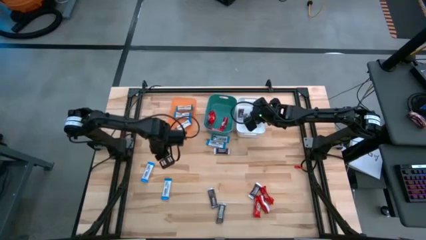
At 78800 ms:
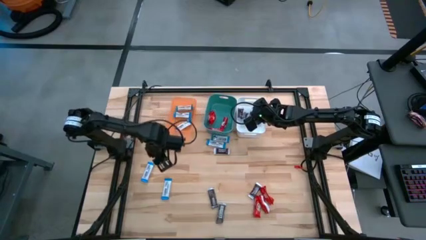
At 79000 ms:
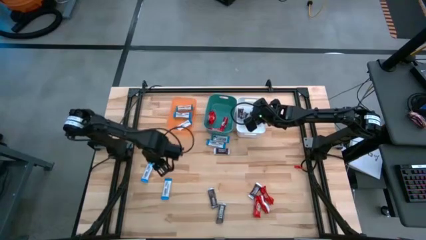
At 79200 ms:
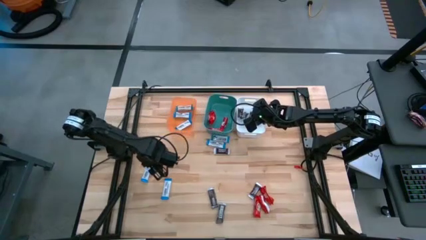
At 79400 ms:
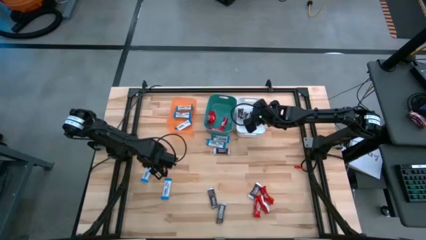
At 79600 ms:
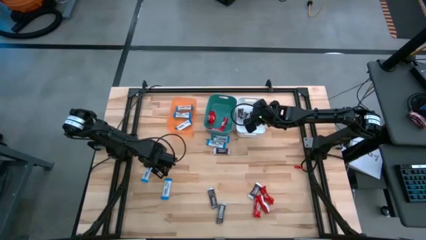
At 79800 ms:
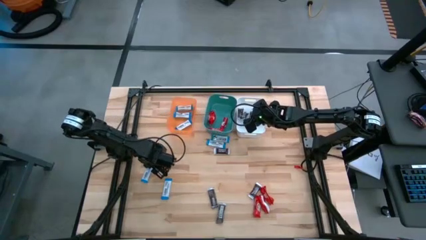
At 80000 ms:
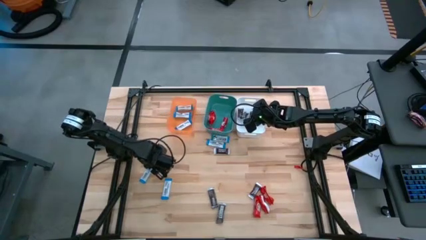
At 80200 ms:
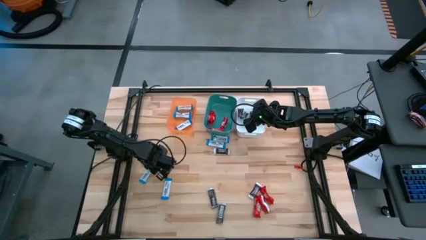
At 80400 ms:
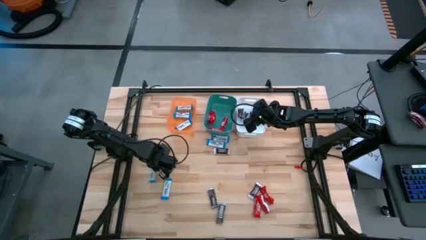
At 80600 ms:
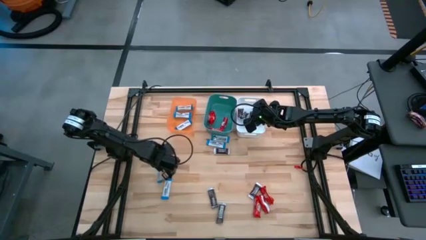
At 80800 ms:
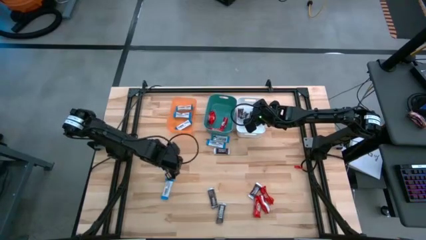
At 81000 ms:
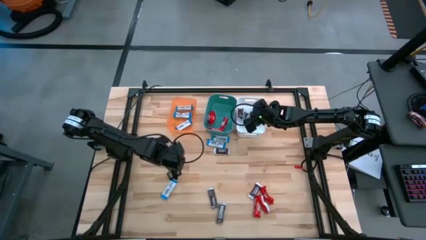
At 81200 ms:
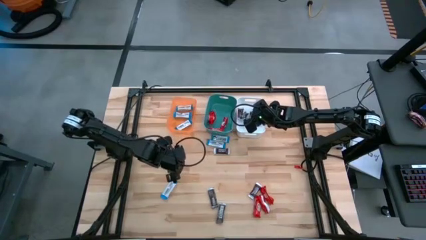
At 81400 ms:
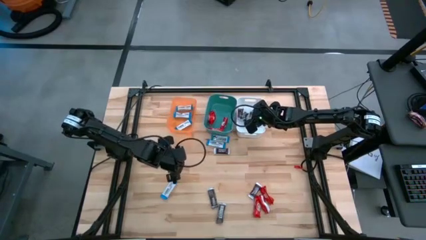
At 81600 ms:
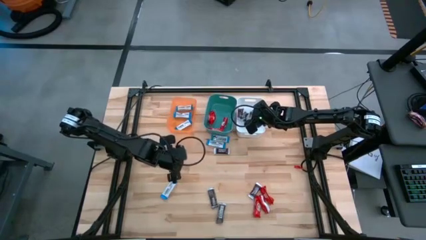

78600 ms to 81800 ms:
Task: Organize candy in baskets
Put the white chocolate into the orange bin

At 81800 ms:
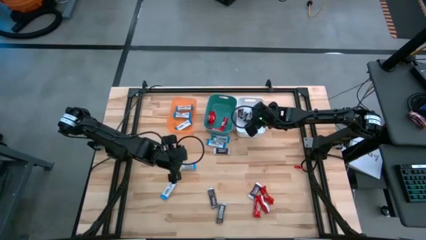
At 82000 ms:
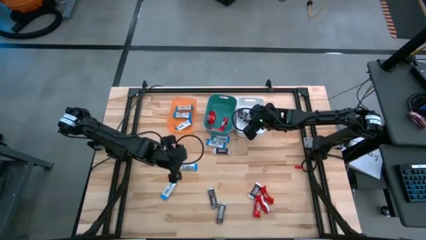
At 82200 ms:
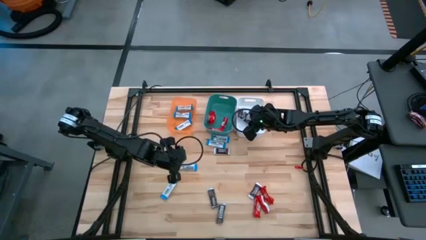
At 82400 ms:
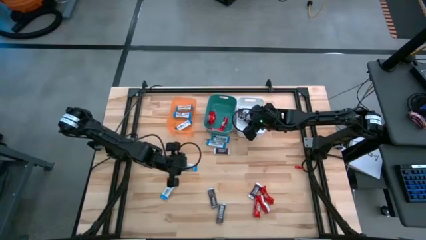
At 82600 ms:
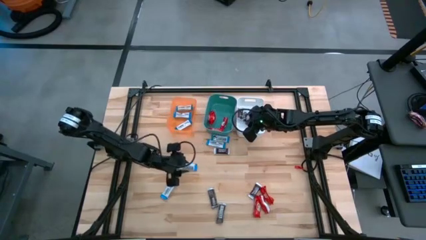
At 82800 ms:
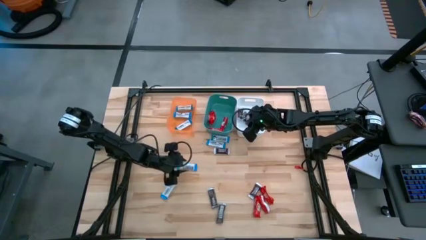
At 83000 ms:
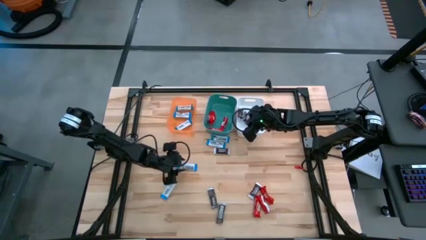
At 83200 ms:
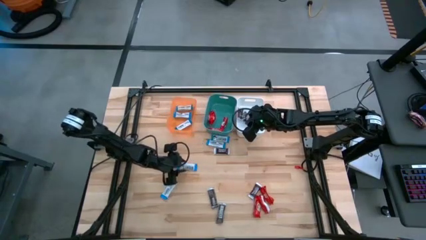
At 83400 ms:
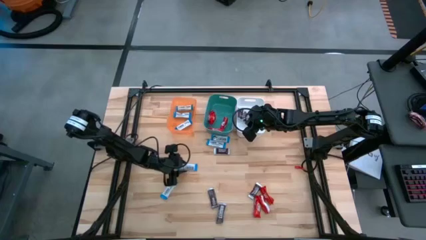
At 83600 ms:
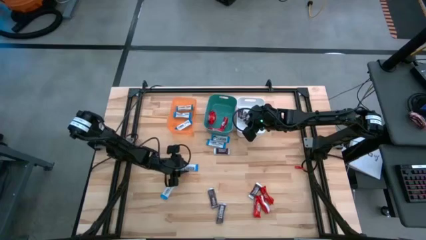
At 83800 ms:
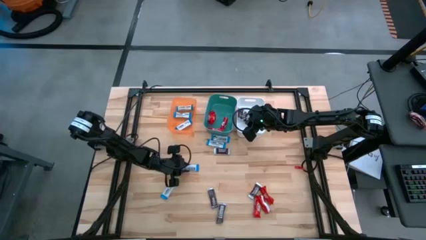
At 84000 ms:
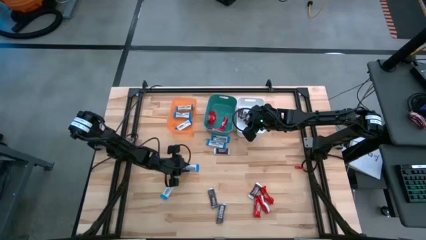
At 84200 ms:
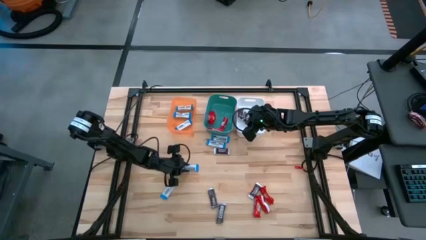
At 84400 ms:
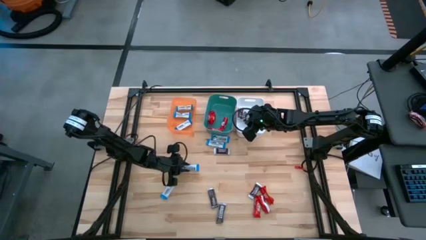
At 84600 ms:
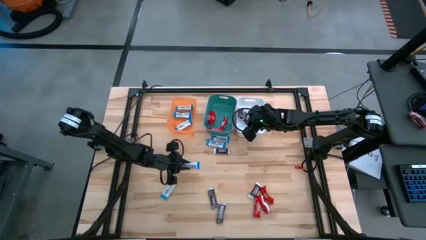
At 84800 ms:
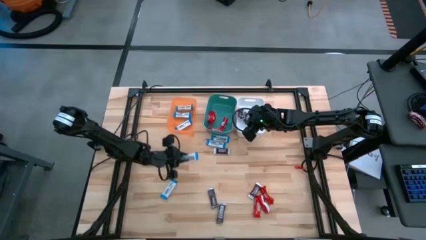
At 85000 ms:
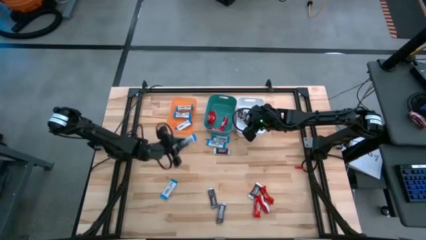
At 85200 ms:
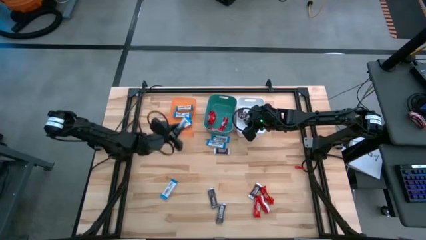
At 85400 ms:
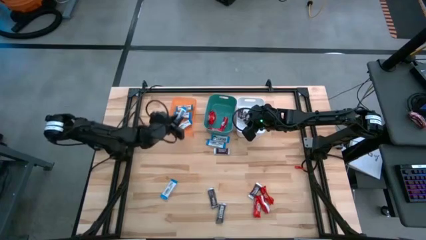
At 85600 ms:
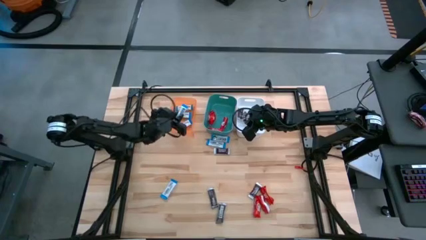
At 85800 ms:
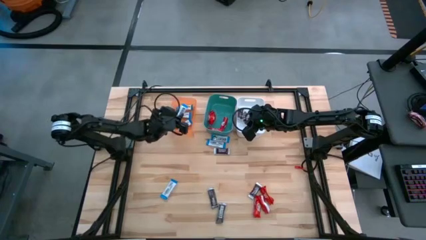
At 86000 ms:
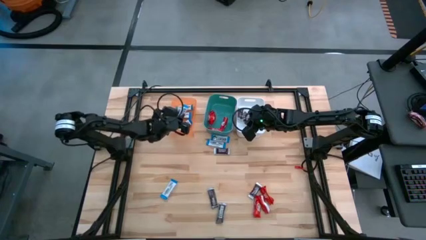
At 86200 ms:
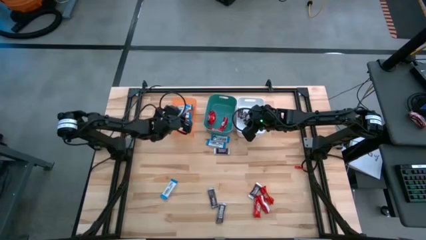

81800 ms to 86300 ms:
Put the white chocolate into the orange bin

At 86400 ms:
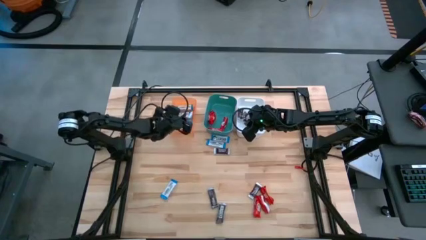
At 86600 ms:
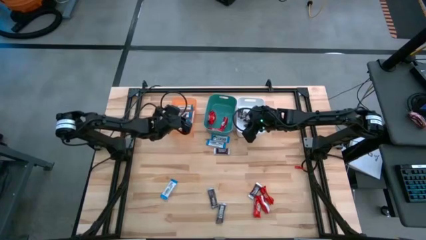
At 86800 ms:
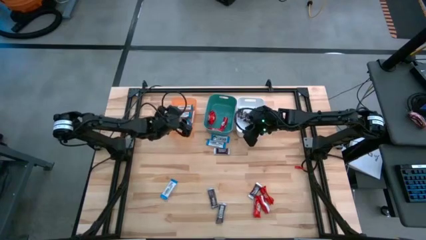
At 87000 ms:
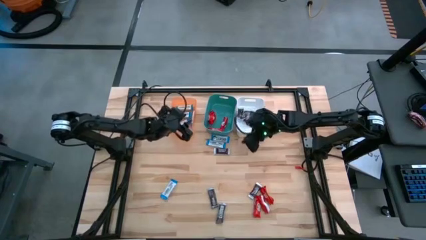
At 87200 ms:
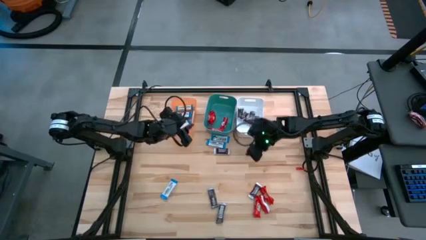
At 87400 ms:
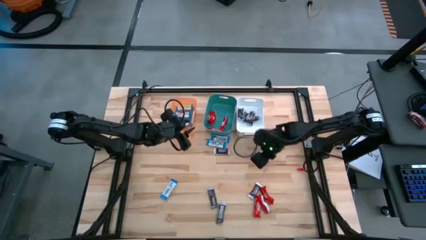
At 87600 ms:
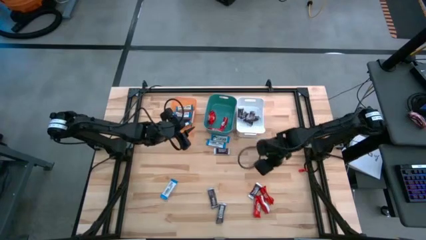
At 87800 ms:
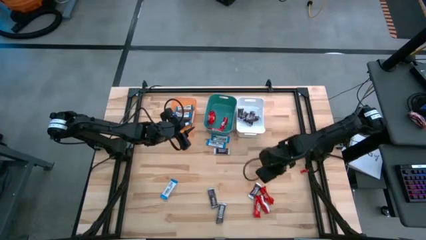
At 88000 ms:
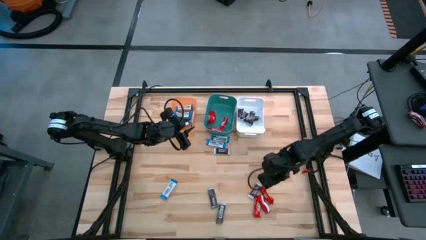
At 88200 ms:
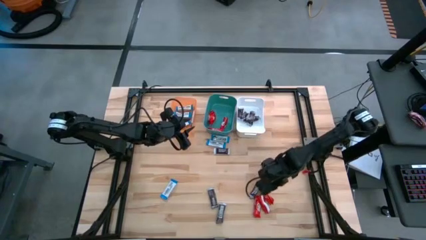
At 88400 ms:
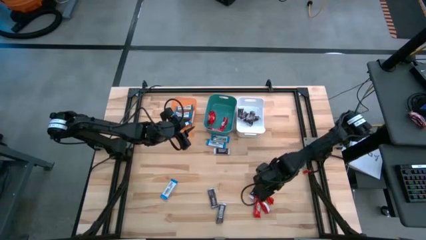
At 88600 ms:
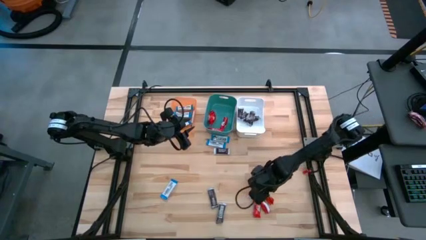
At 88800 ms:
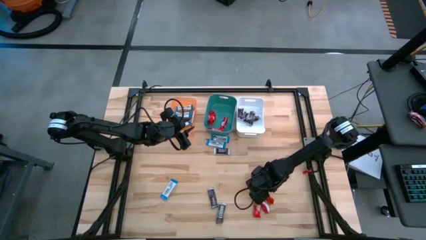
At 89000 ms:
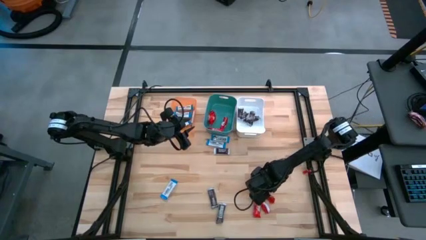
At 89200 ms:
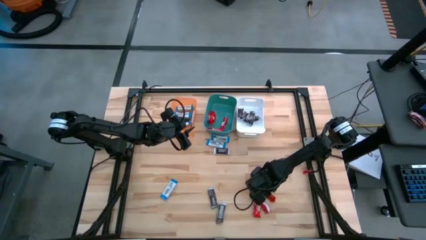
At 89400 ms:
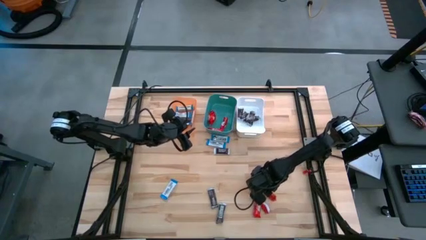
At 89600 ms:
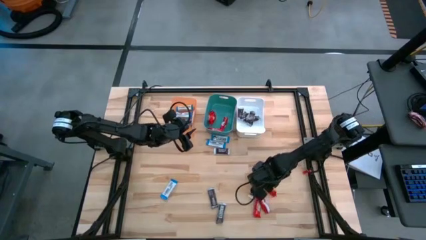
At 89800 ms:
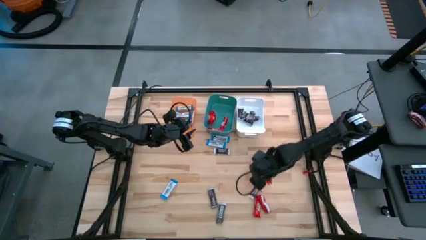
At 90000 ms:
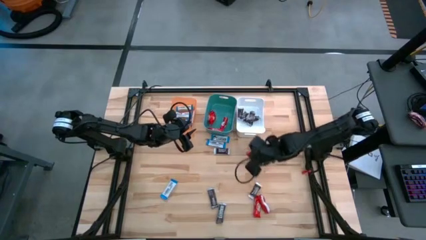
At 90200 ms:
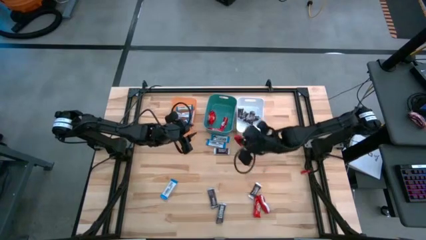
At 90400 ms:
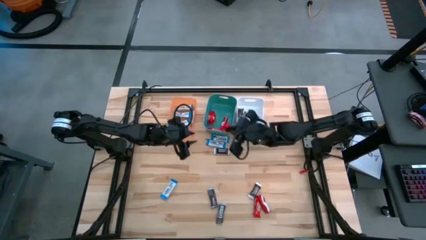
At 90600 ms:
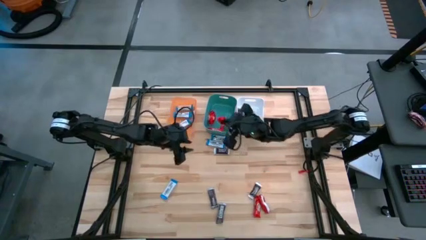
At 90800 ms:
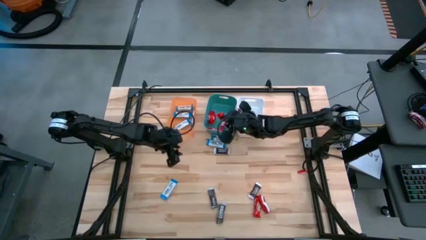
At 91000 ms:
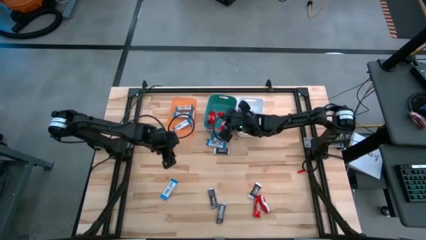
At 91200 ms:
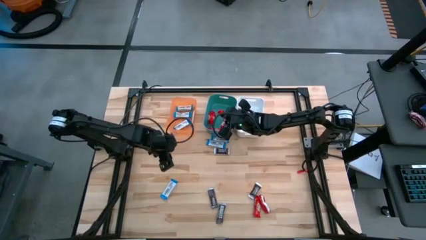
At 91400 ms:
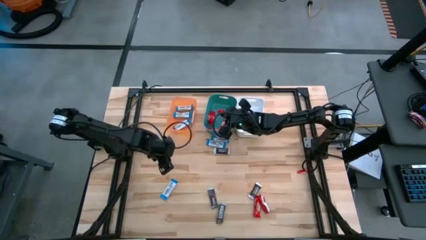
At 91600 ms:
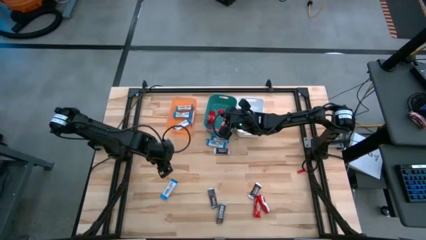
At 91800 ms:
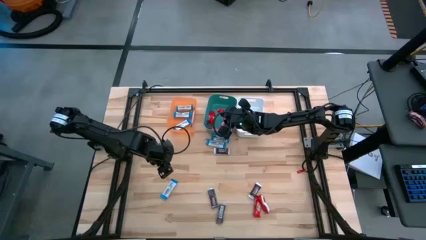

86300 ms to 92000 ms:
Put the red chocolate into the green bin

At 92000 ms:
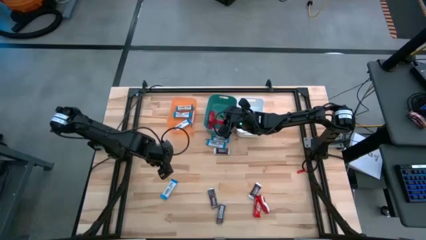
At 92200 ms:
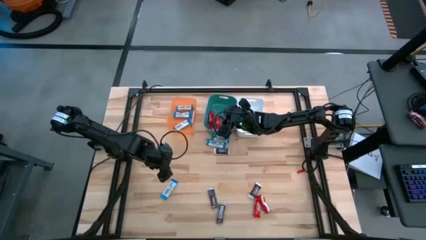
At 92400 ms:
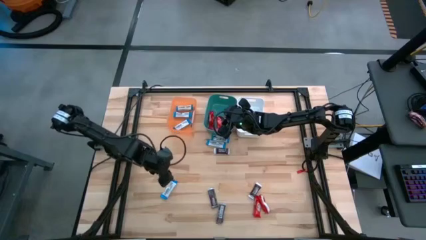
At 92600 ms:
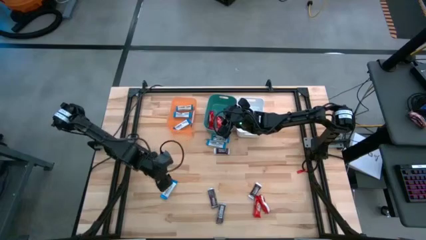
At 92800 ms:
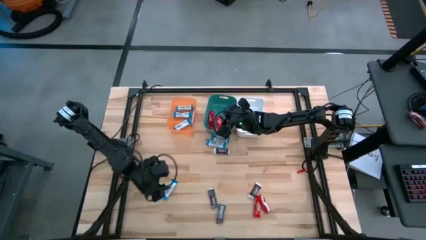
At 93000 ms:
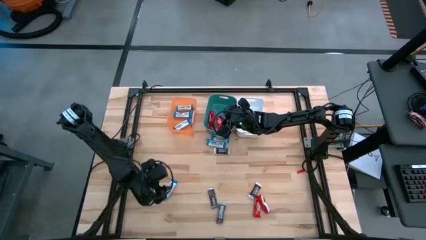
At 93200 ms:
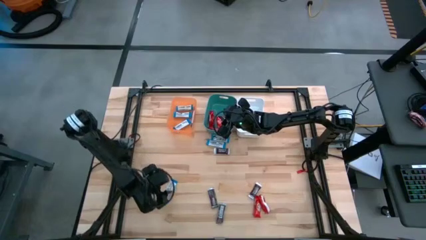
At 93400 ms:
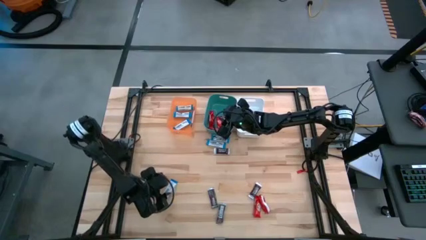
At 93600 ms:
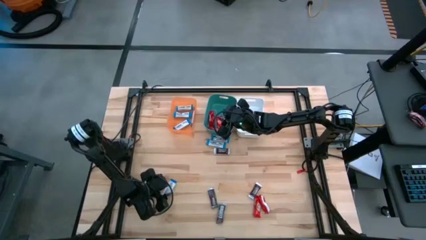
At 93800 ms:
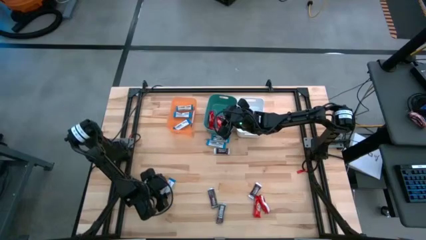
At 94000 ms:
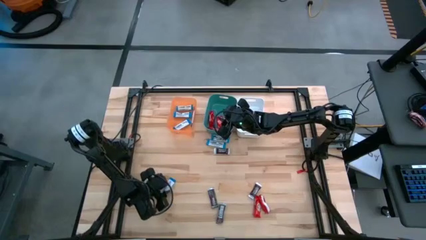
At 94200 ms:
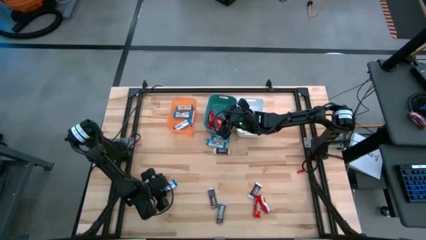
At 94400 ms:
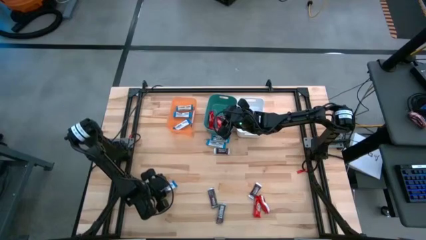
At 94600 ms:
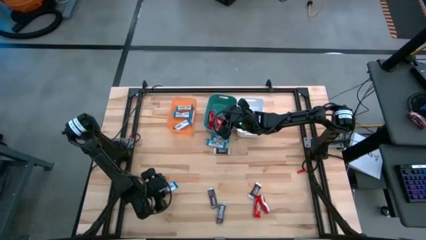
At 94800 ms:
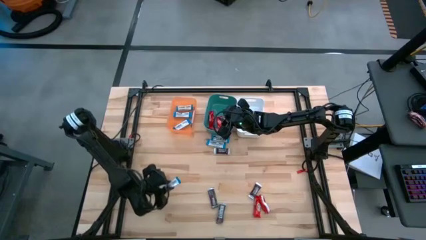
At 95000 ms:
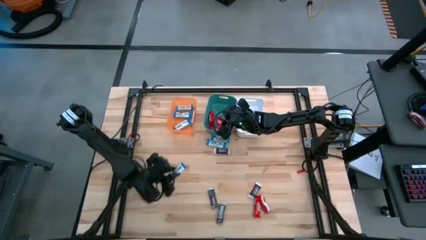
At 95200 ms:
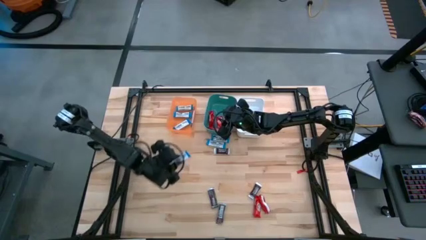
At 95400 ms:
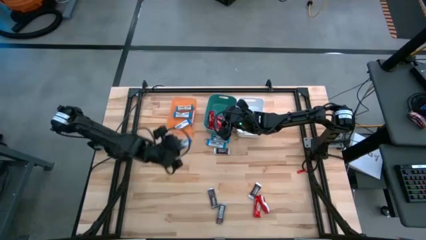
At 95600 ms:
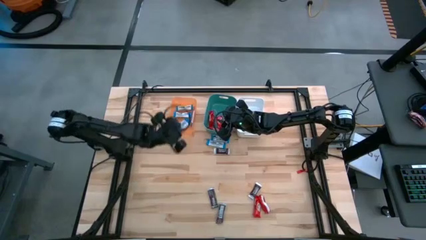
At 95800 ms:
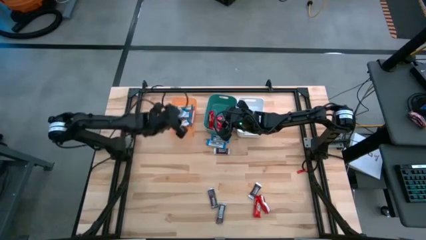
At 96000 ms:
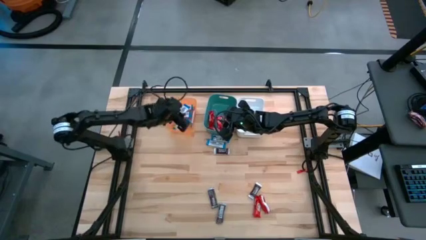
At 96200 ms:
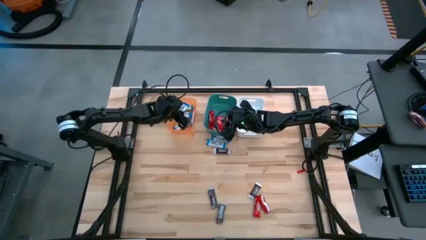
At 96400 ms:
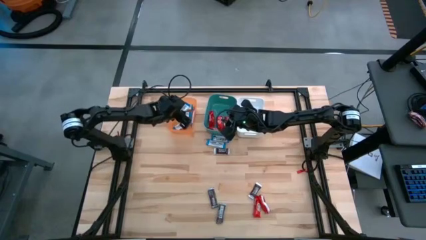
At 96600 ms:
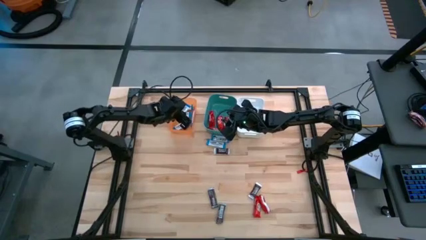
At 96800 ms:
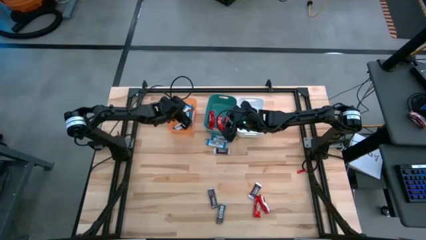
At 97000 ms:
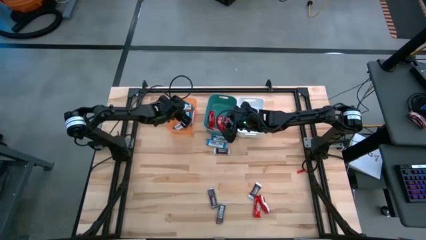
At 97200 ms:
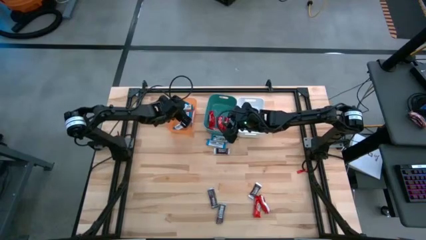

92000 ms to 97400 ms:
Put the white chocolate into the orange bin
